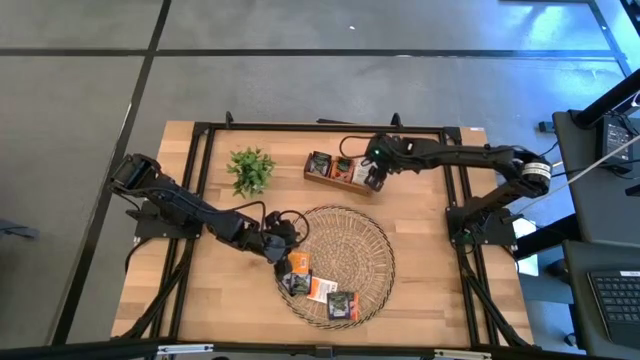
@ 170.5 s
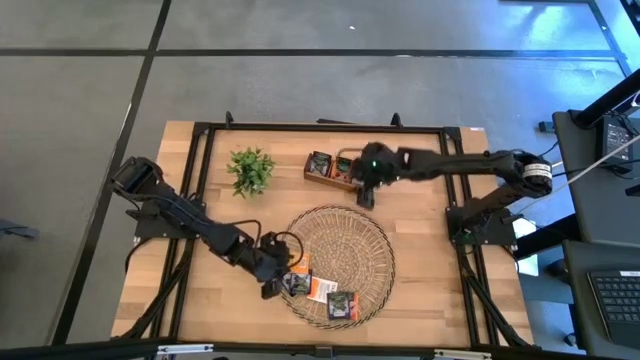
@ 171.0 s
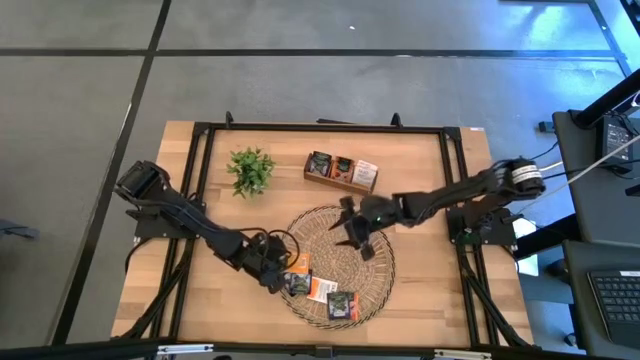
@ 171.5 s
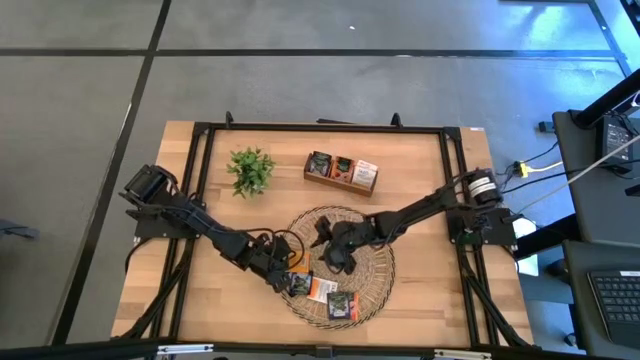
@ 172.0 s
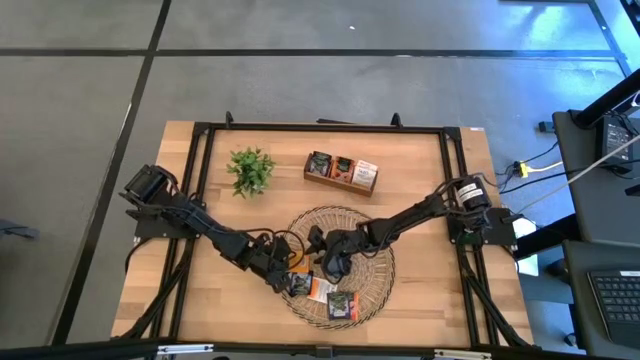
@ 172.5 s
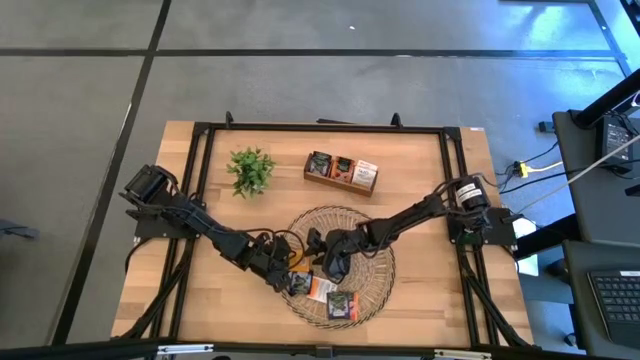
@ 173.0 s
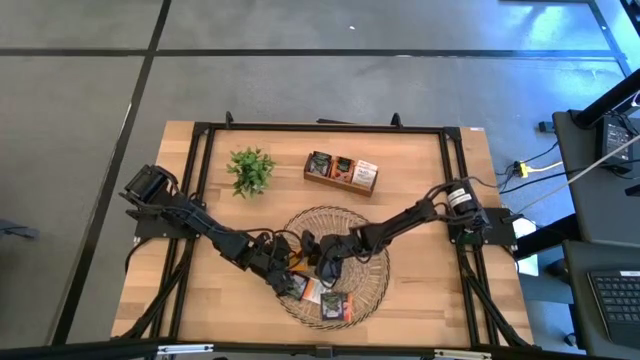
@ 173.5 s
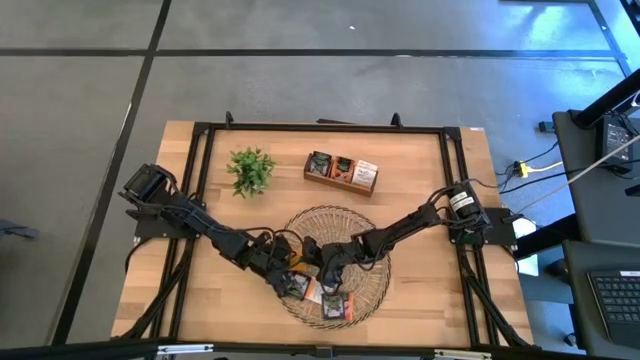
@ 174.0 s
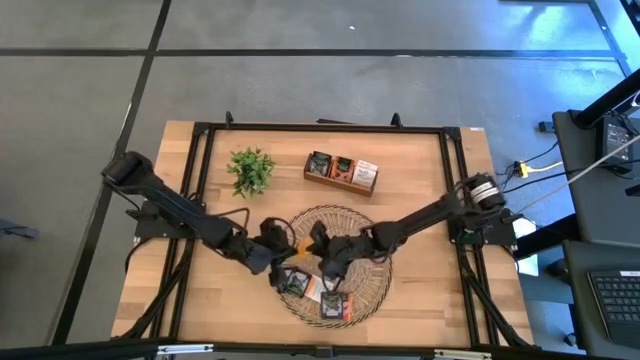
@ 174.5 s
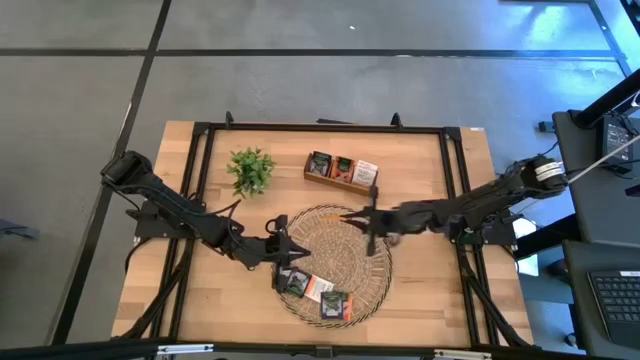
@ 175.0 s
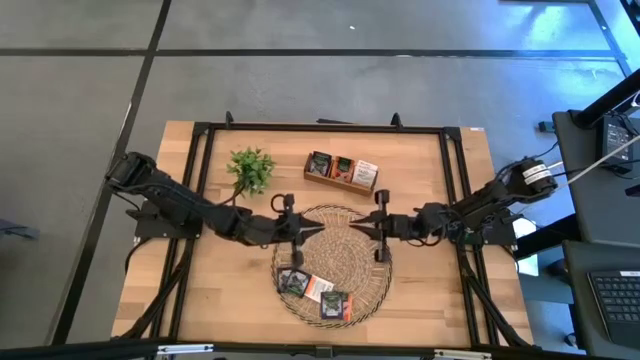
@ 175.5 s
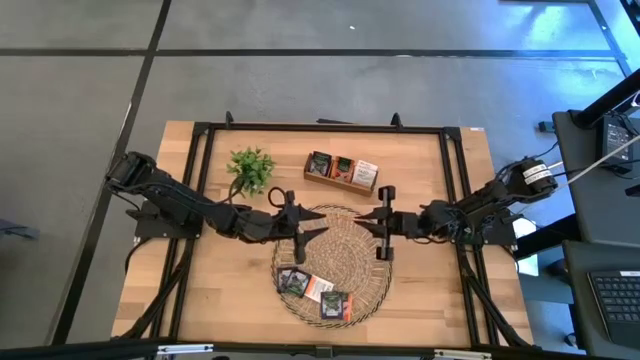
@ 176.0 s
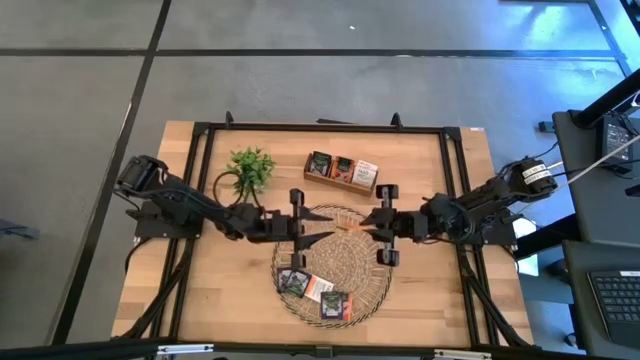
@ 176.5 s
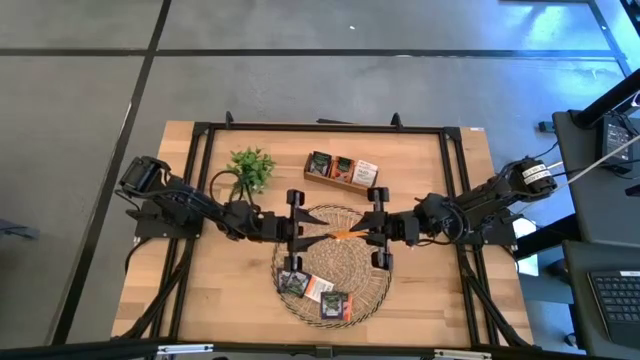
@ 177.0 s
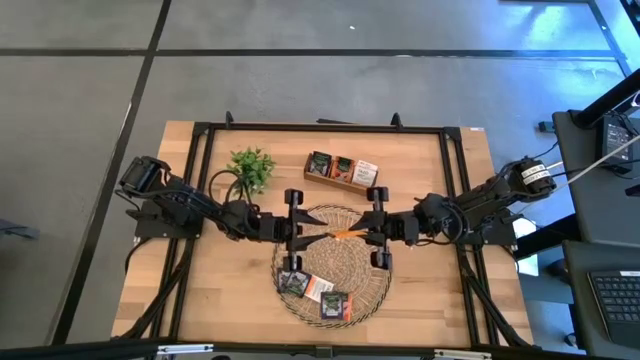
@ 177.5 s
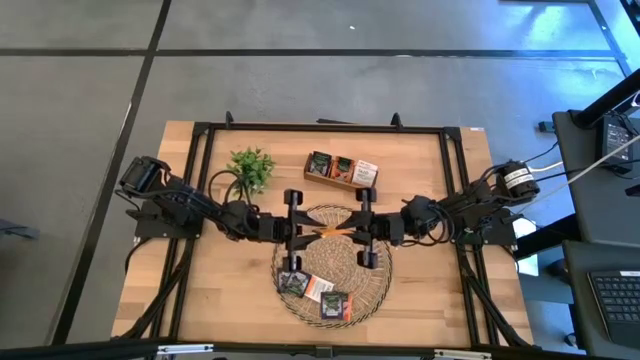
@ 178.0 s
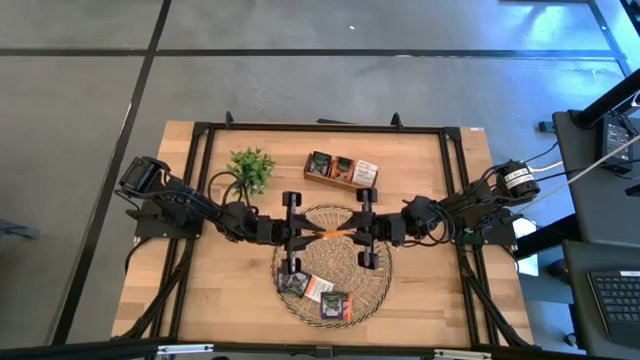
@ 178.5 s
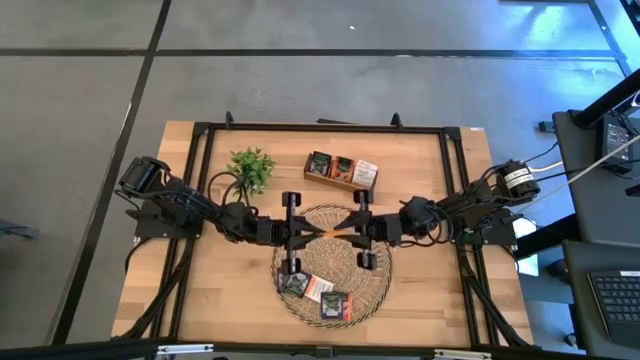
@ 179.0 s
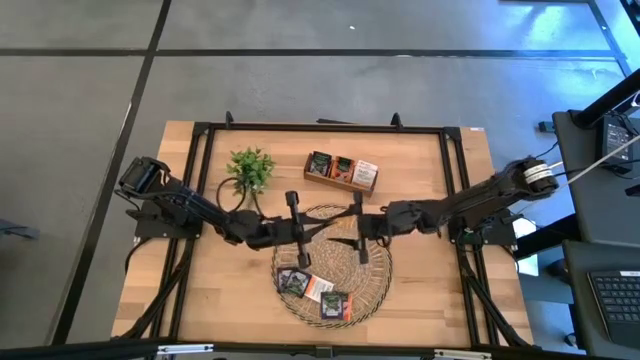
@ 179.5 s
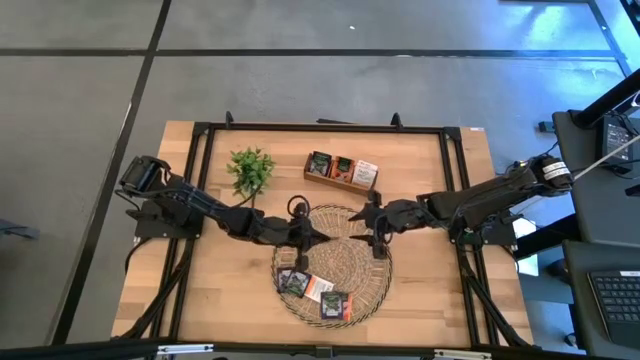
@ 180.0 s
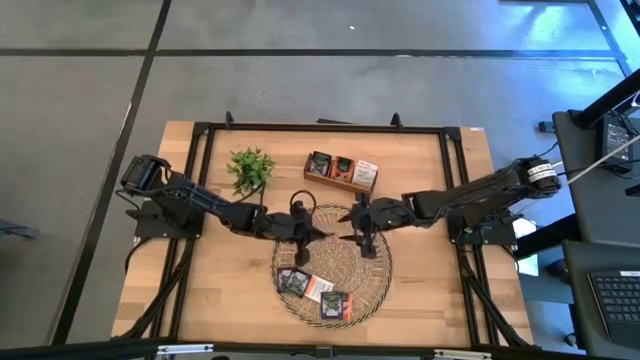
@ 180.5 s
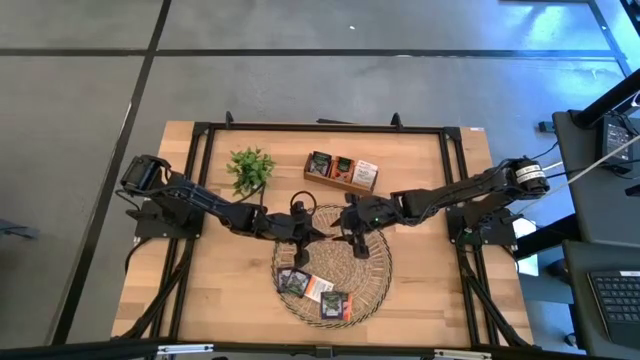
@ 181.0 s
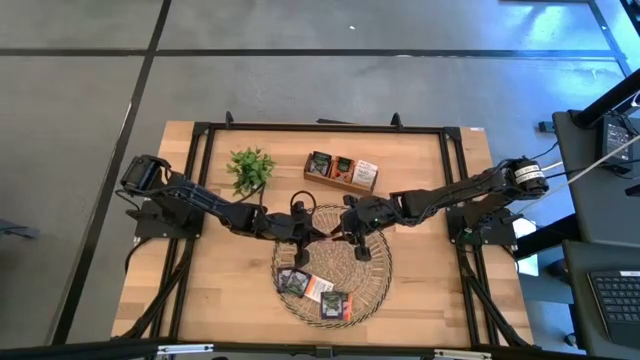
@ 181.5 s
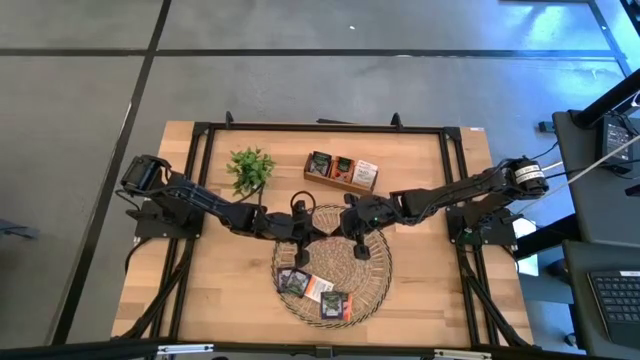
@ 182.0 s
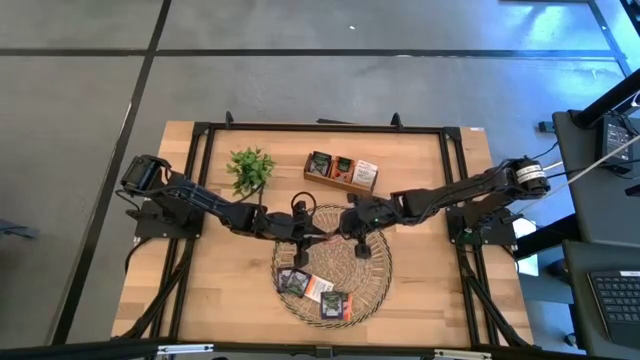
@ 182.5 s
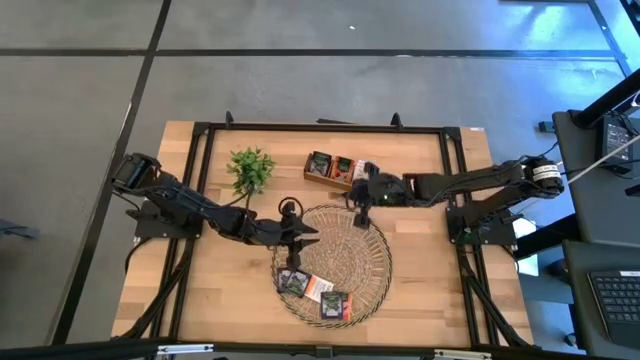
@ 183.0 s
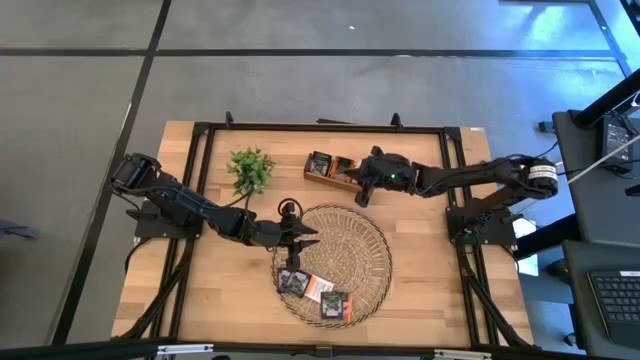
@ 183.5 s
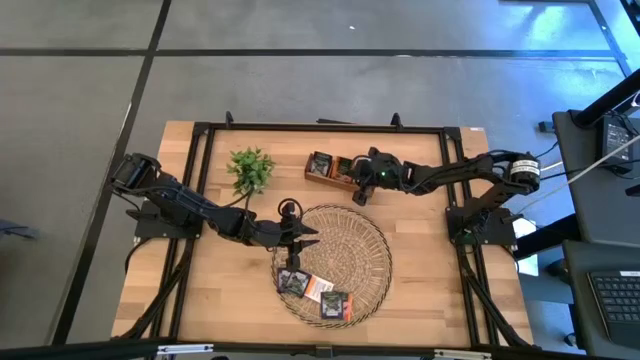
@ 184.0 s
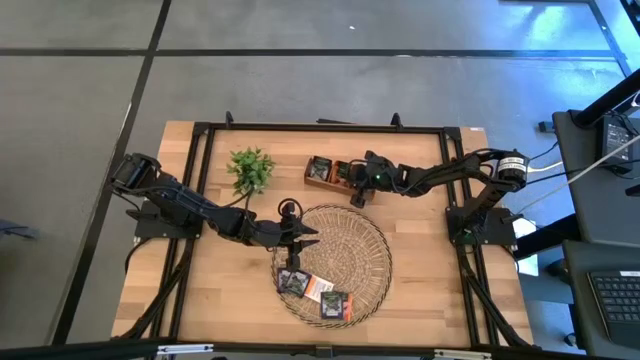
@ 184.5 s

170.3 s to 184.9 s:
Task: Pick & Place Tea
Put the orange tea bag into the middle section of the wooden organizer

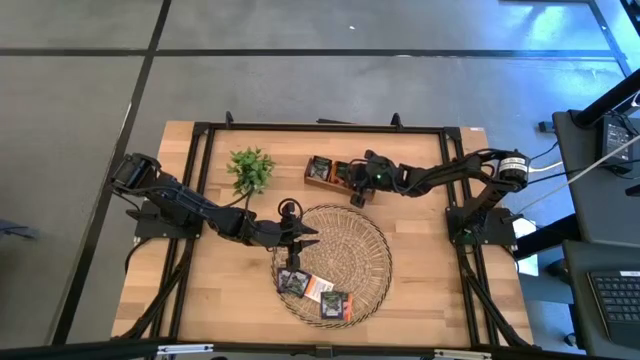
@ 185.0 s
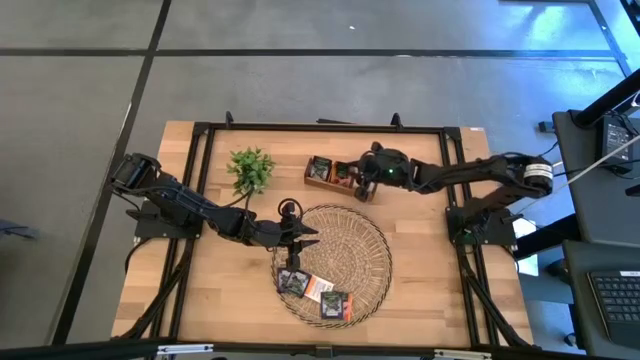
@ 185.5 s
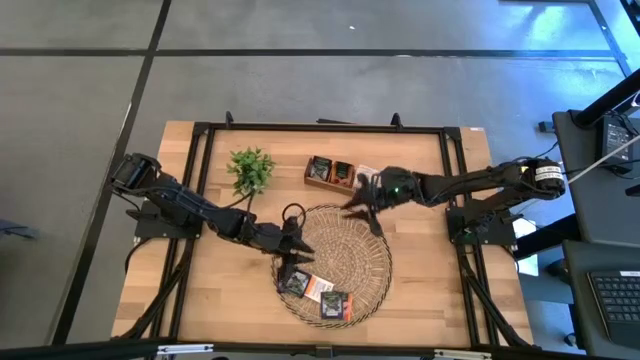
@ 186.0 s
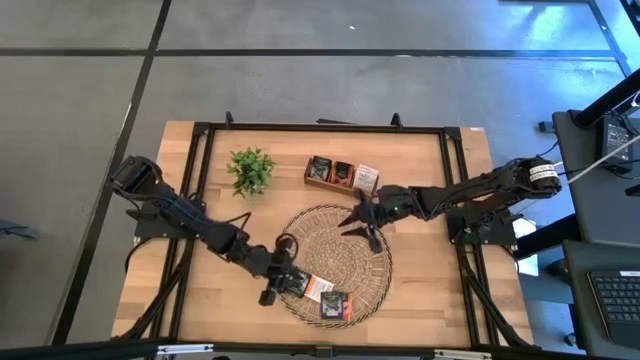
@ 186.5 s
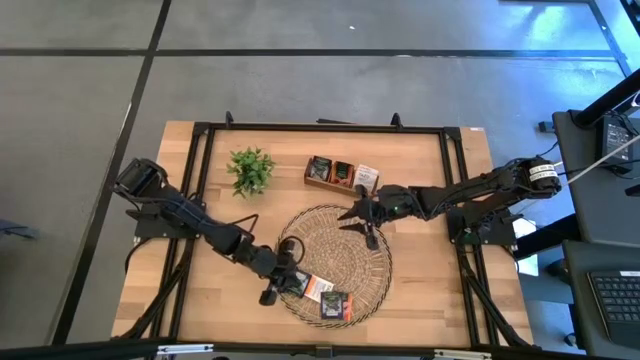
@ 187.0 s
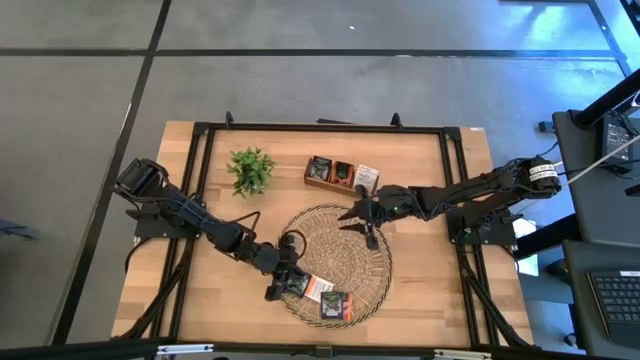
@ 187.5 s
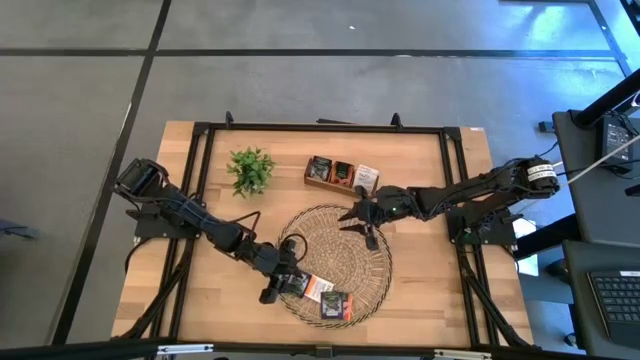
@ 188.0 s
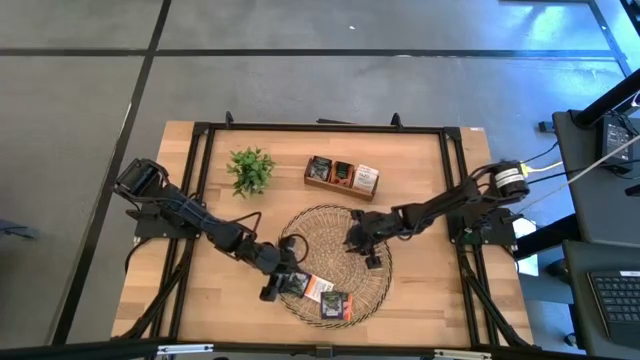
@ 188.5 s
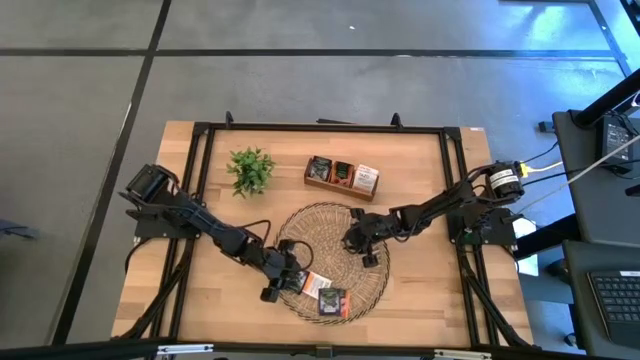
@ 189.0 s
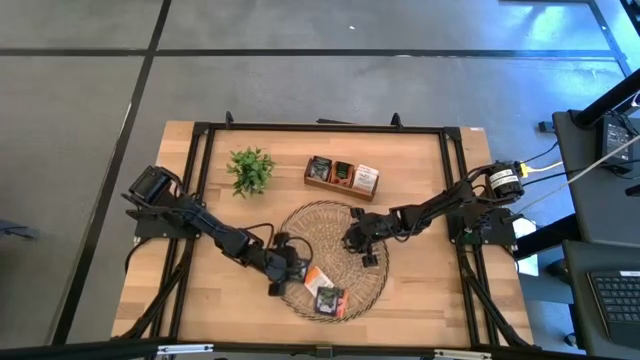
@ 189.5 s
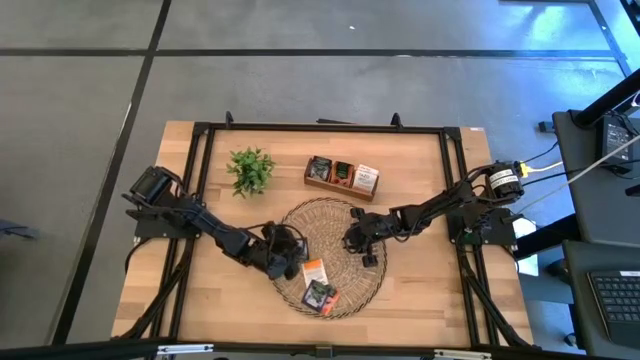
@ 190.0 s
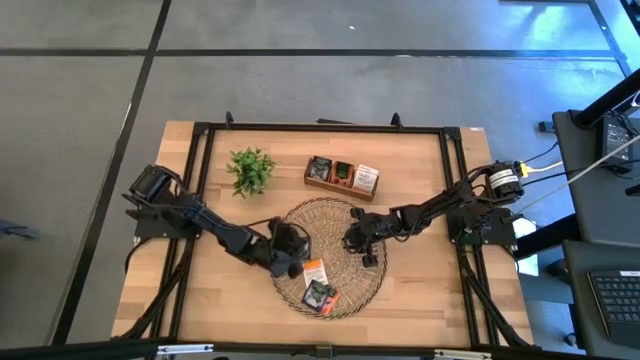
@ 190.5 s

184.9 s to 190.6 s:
Put the black and white tea bag into the left section of the wooden organizer

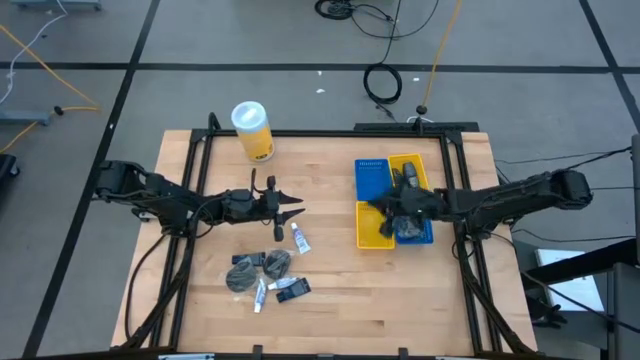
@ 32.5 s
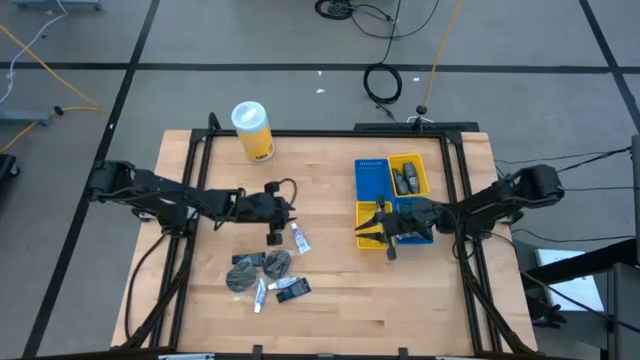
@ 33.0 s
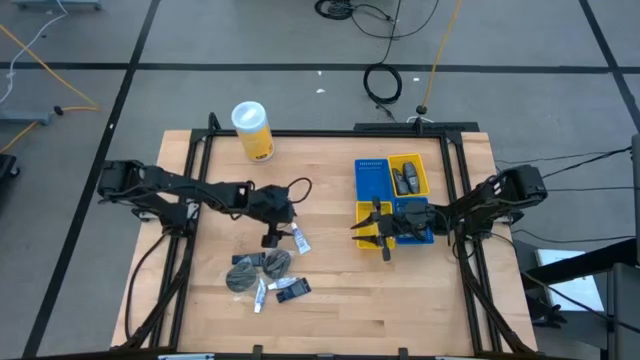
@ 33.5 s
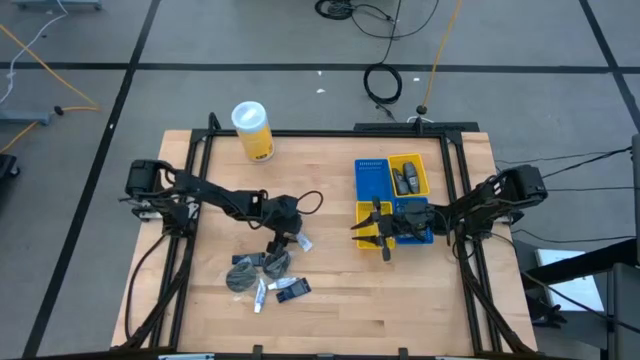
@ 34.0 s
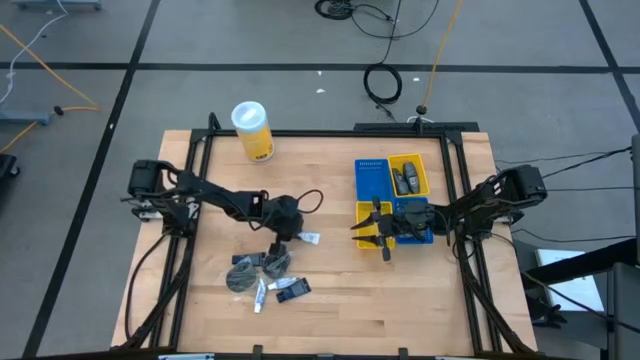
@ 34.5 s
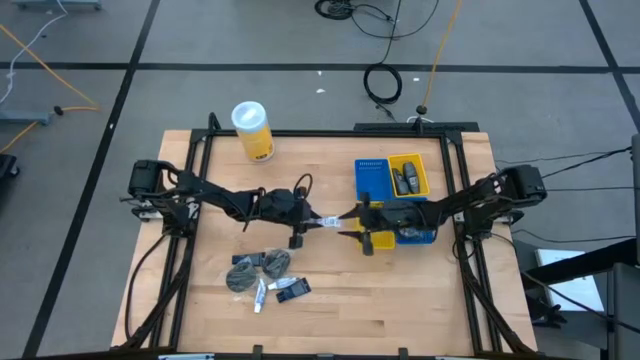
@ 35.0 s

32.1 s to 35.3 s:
Task: Pick & Place Travel size toiletries
Put the white toothpaste into the top blue bin
